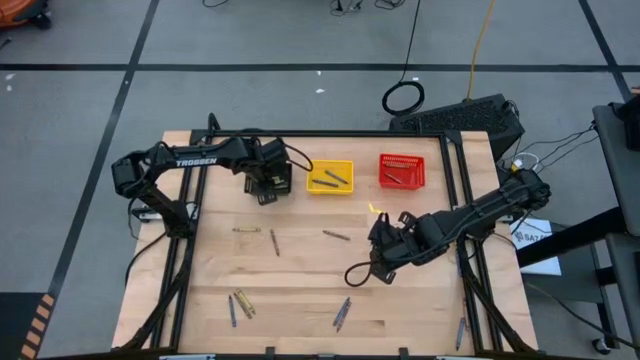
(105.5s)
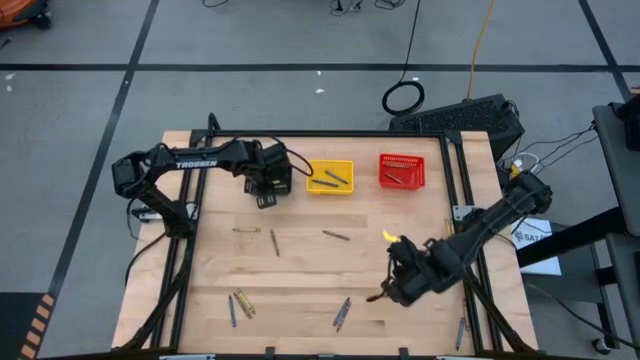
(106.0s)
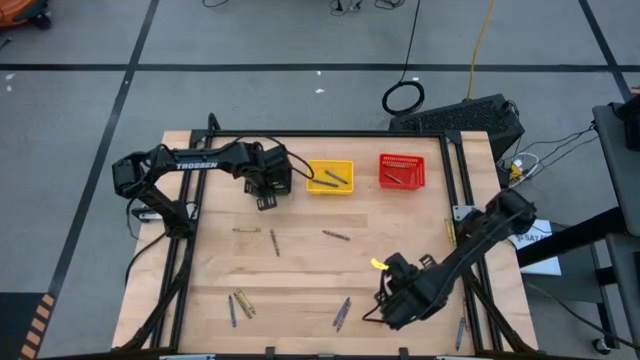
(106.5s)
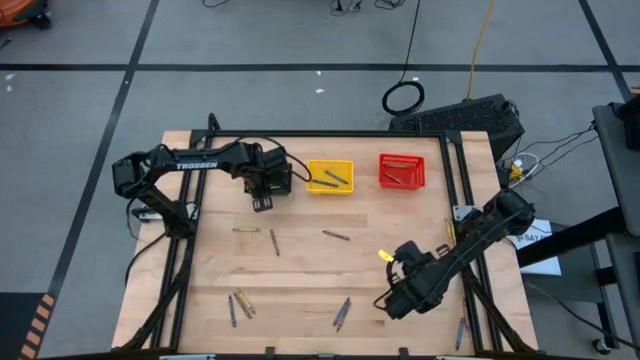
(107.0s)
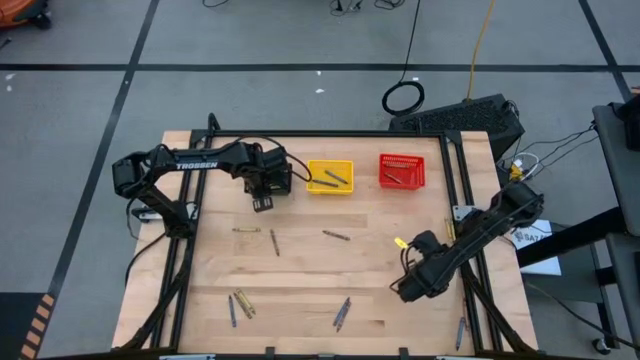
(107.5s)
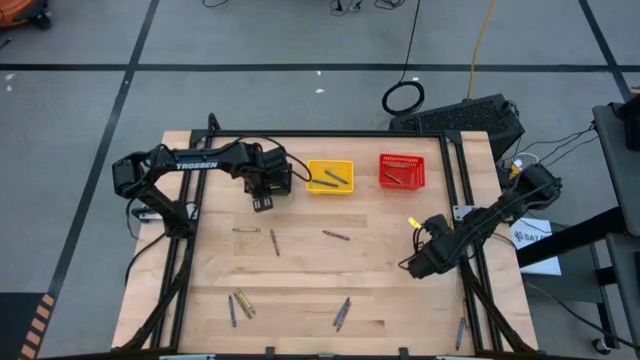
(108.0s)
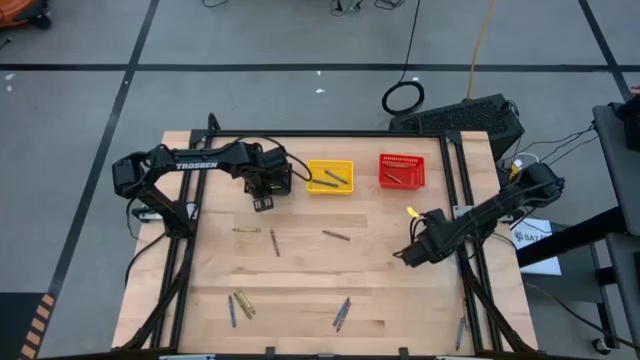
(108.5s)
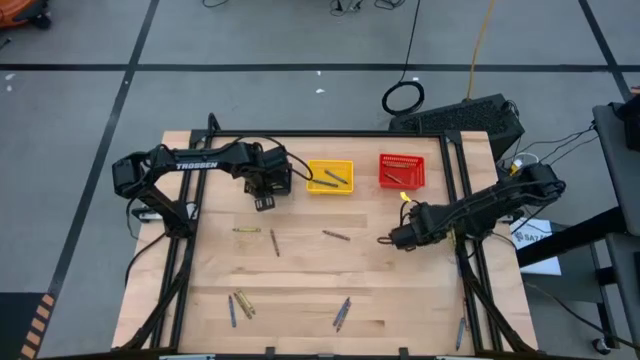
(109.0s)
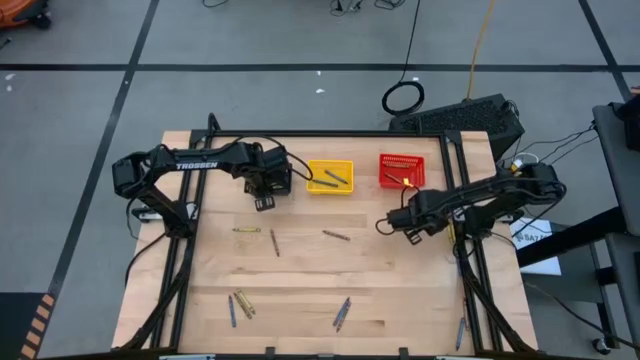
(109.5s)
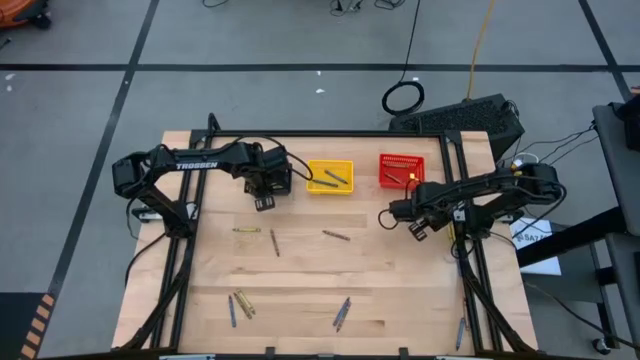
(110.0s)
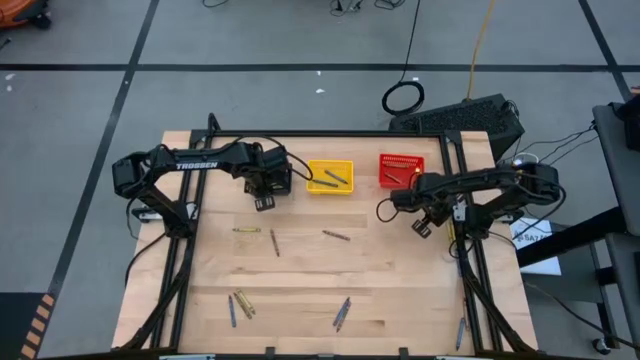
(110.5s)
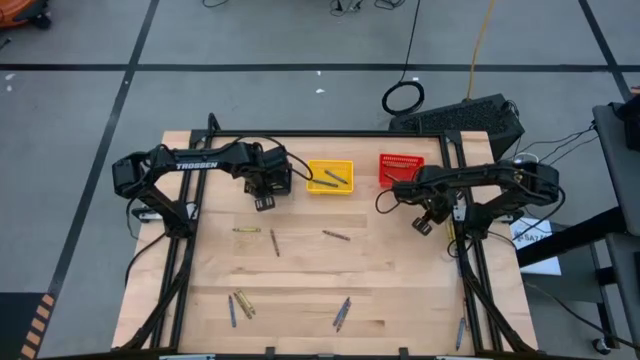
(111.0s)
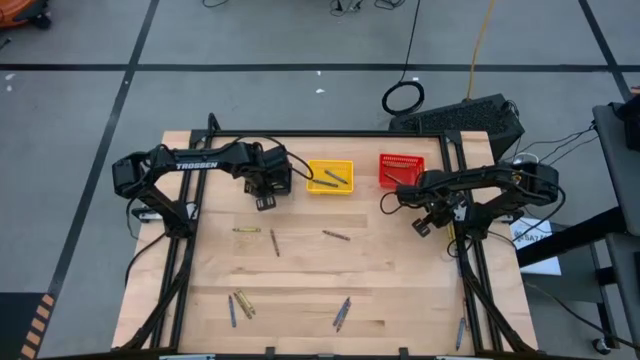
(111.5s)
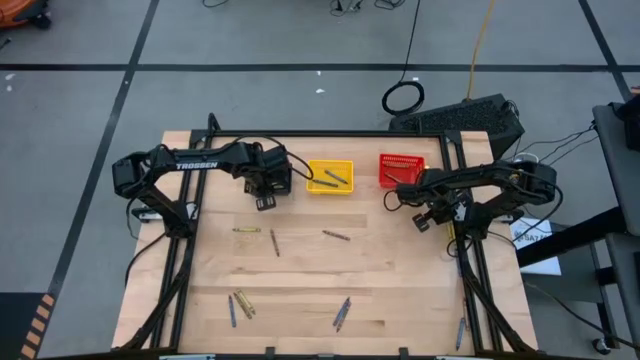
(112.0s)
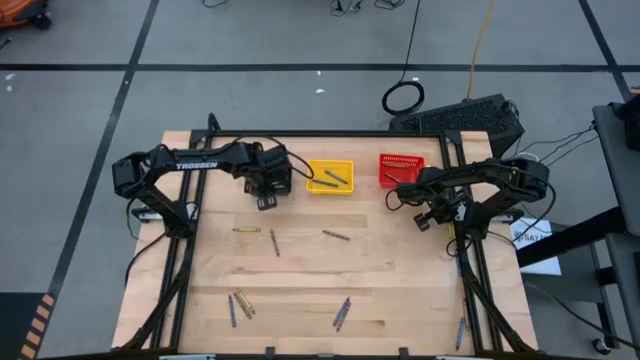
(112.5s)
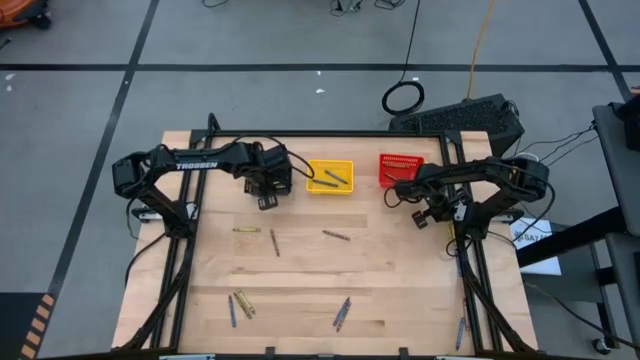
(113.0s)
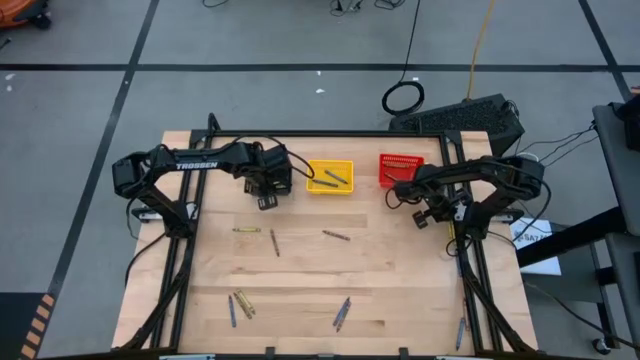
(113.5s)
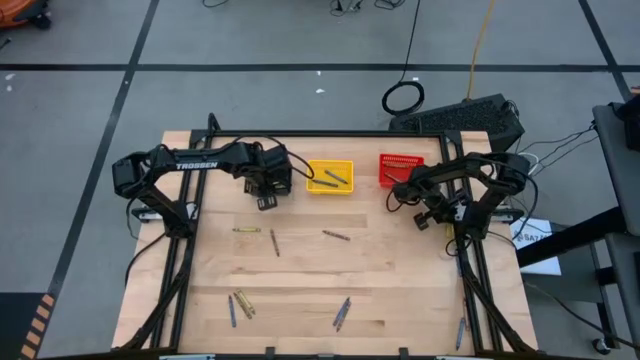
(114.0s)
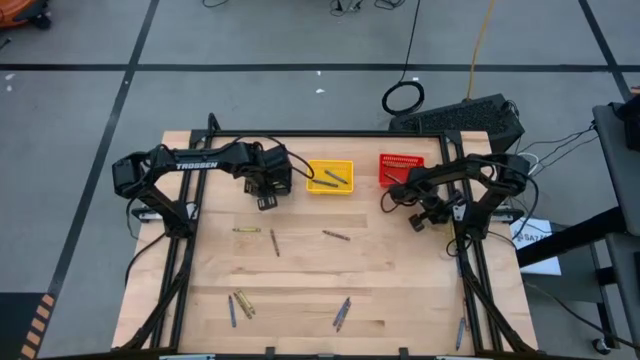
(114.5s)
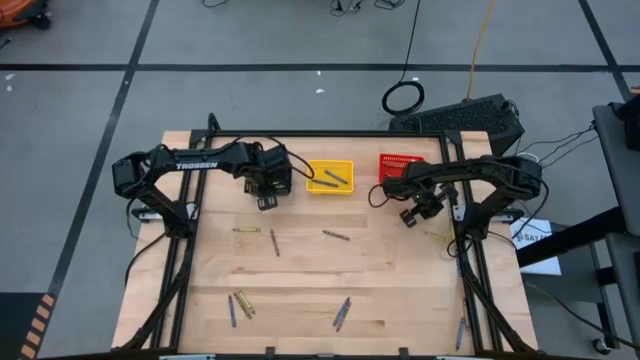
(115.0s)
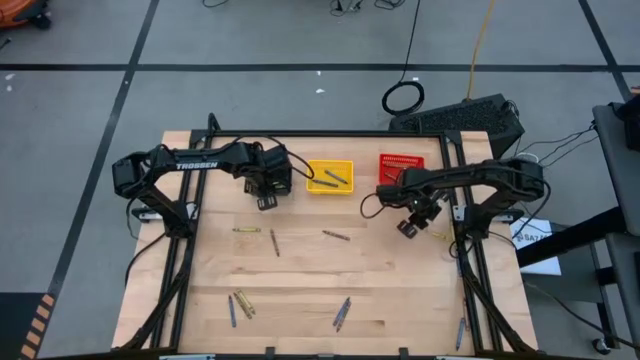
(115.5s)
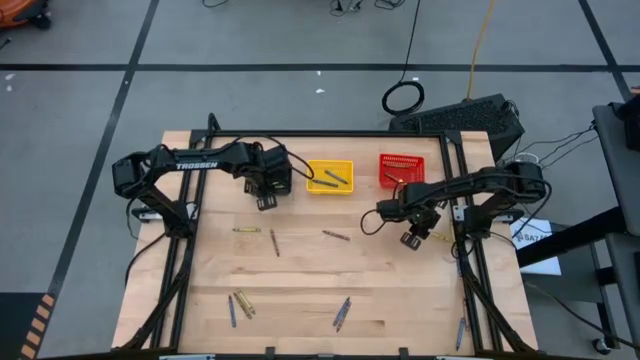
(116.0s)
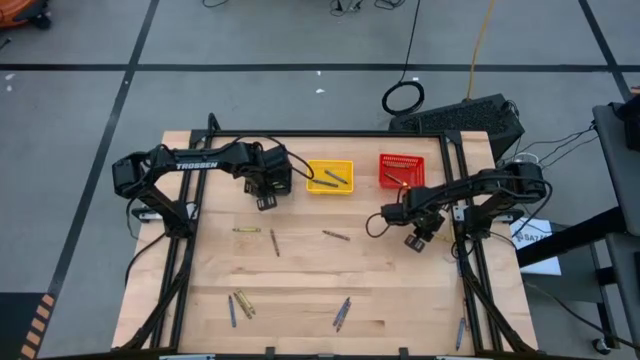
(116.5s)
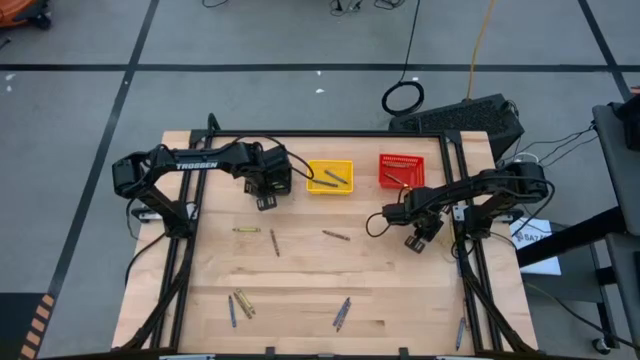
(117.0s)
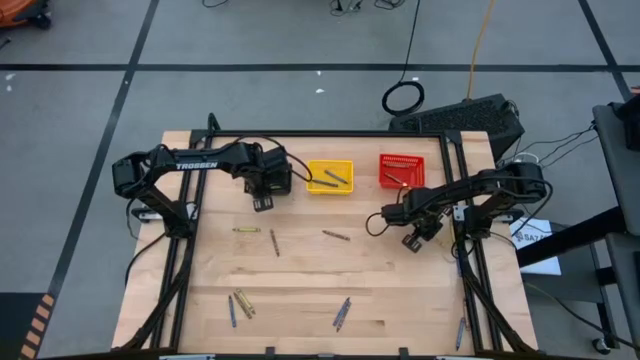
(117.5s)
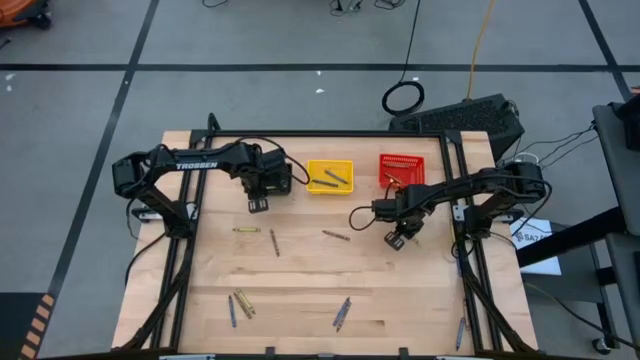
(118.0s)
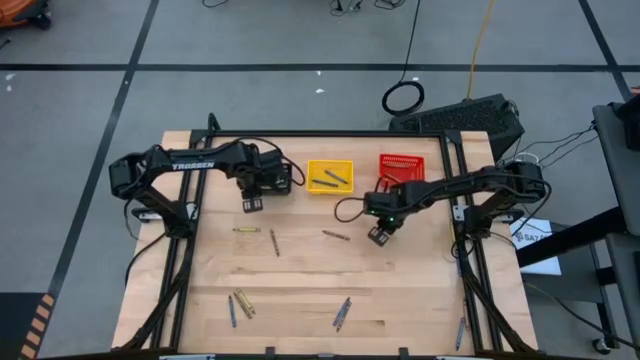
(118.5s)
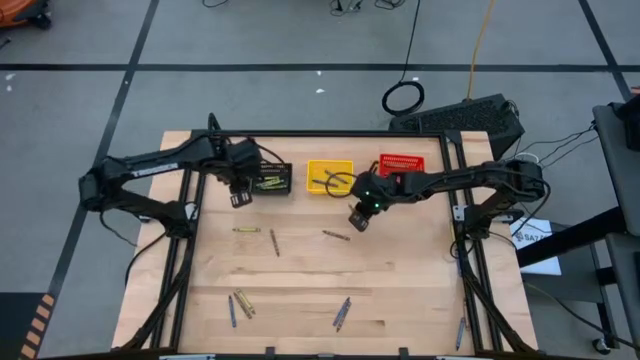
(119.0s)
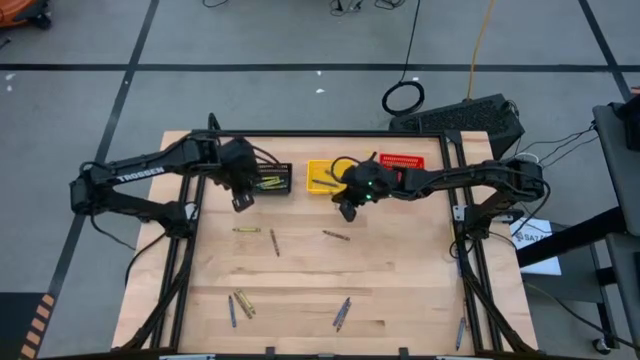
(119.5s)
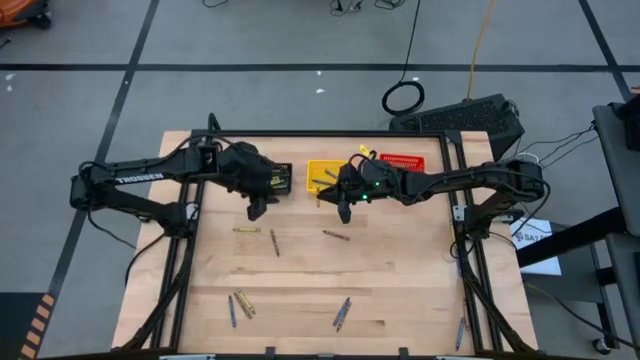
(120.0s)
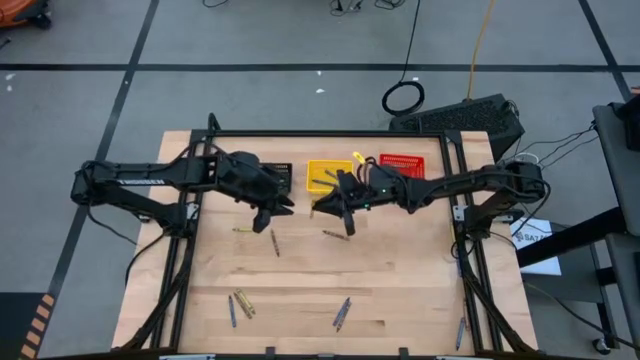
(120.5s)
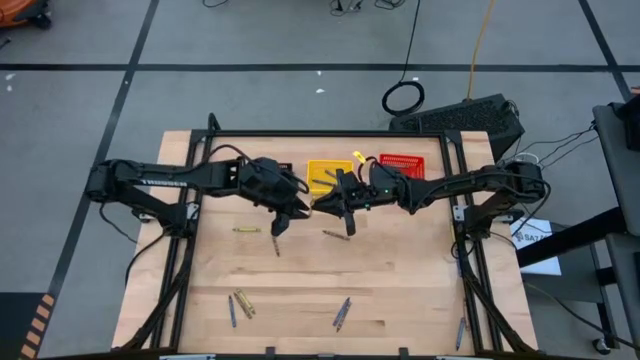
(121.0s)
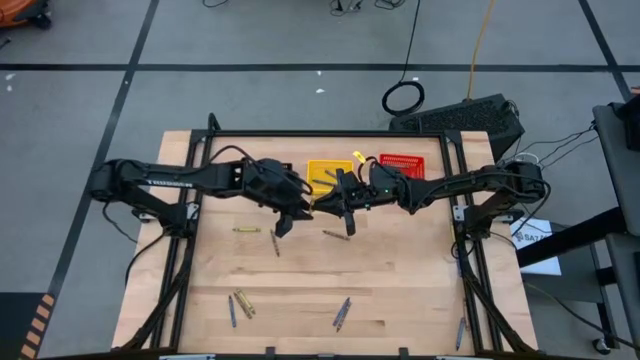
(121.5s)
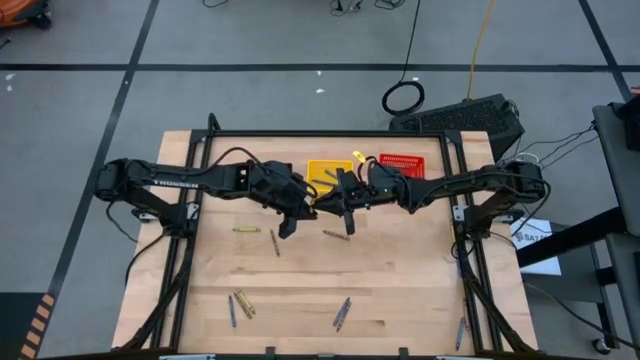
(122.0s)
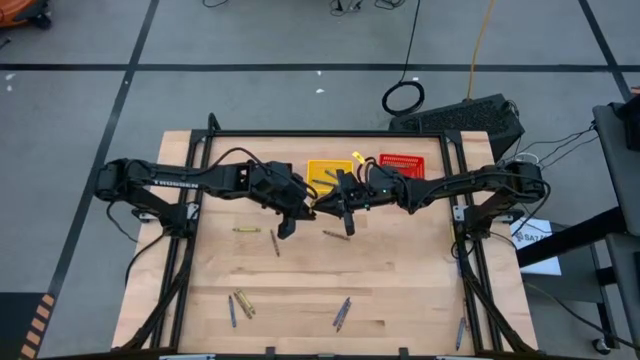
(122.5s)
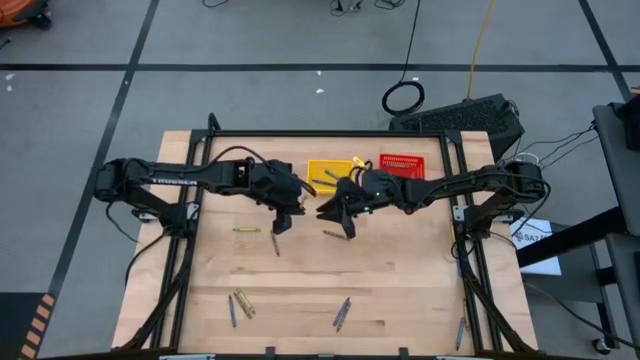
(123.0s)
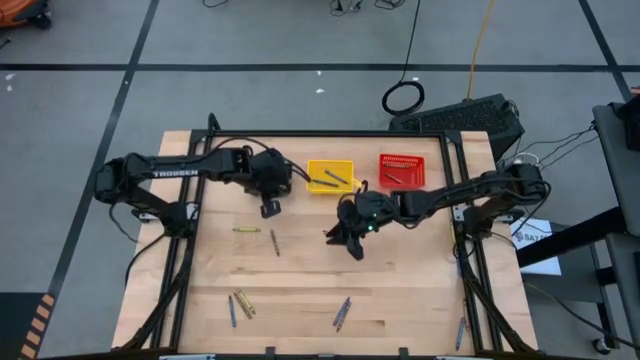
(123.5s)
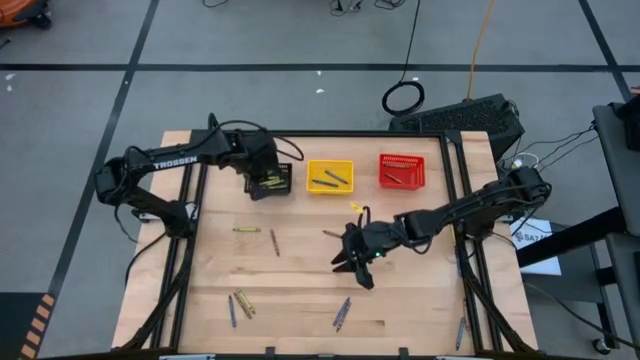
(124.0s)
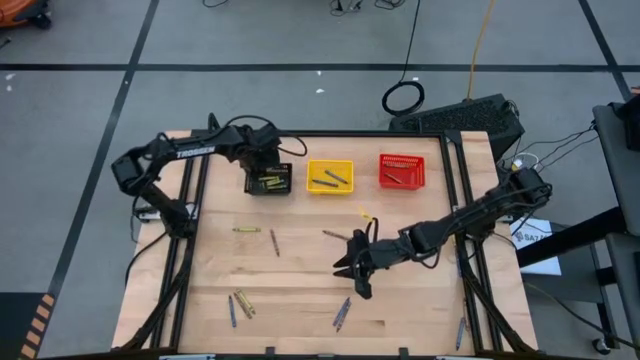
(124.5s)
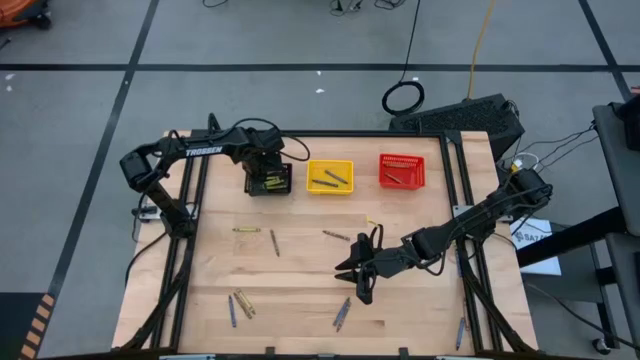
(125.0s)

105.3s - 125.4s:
Task: Sort crayons
Put the green crayon into the black bin

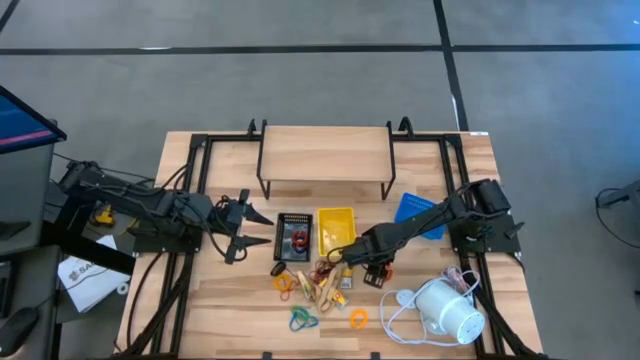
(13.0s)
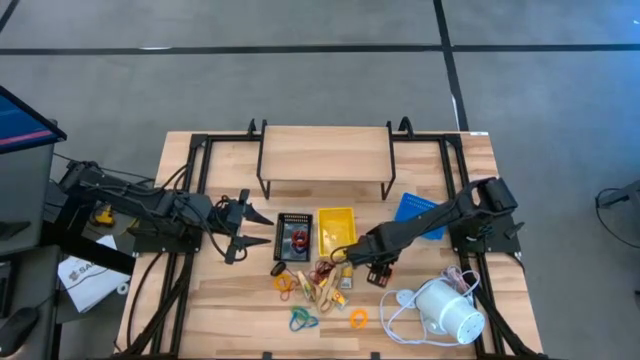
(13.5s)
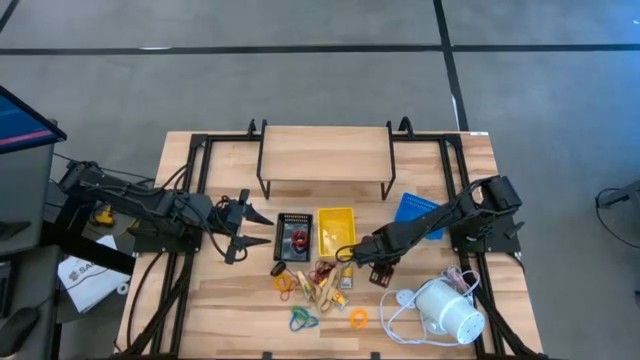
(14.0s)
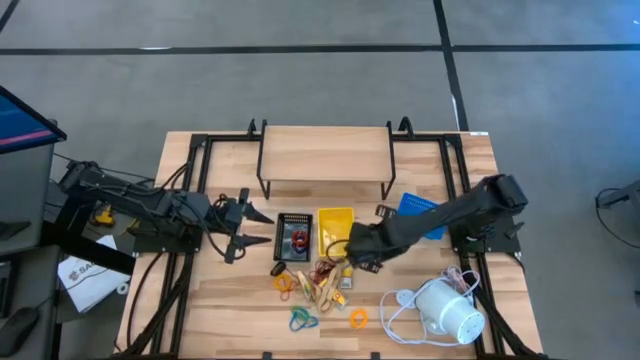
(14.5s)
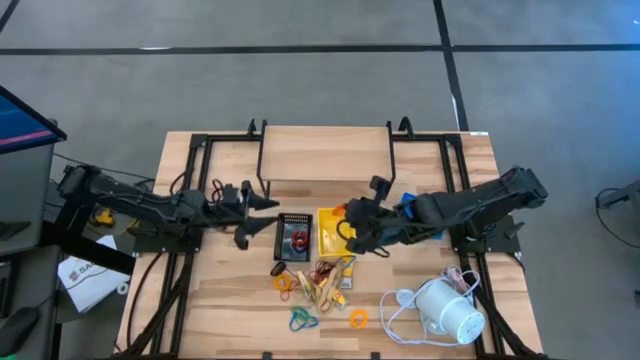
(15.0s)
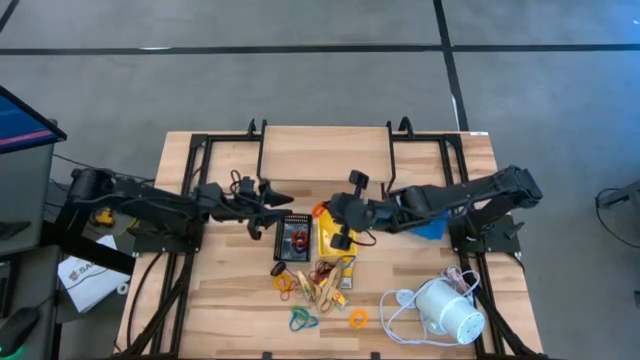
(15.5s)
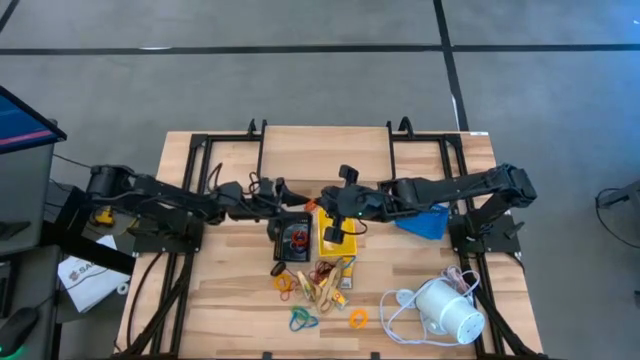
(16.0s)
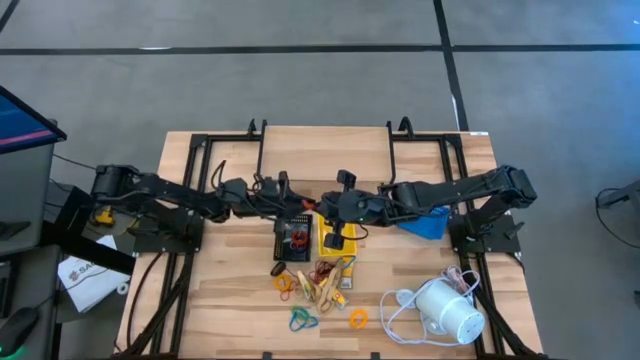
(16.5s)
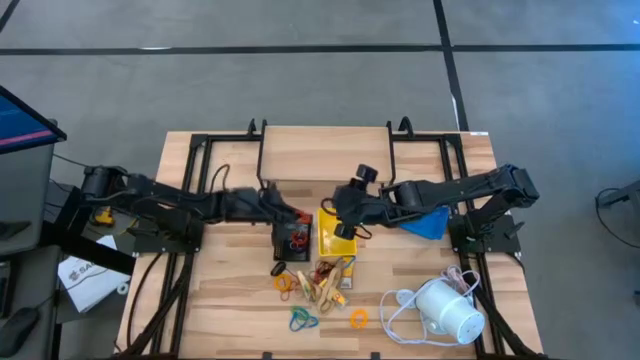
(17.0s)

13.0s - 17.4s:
Task: Pick & Place Office Desk Supplies
Put the orange spring keychain into the black bin
